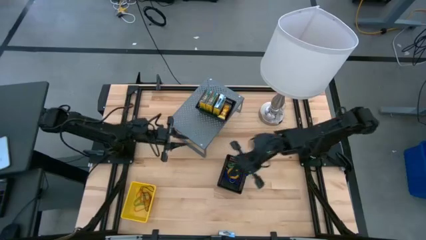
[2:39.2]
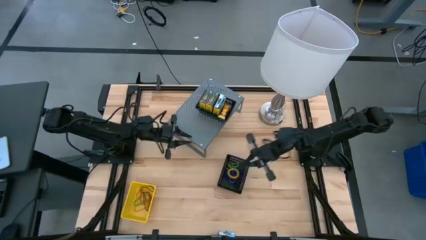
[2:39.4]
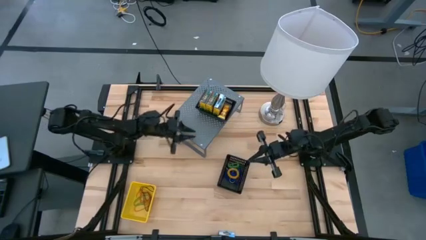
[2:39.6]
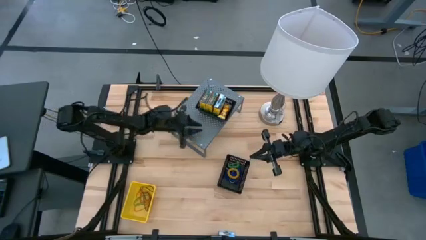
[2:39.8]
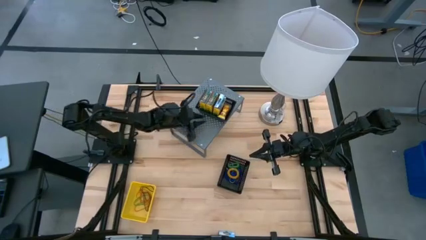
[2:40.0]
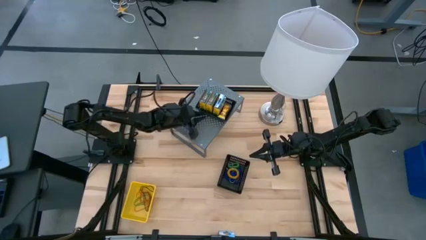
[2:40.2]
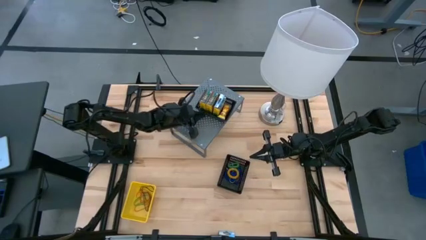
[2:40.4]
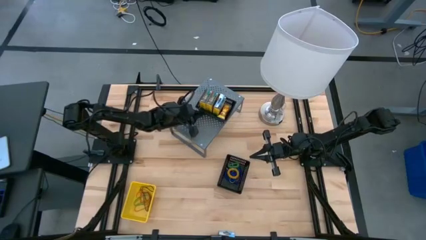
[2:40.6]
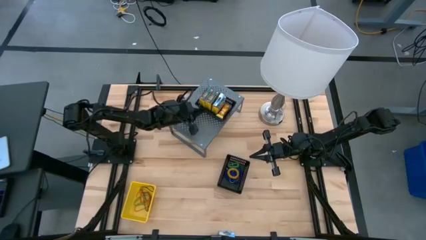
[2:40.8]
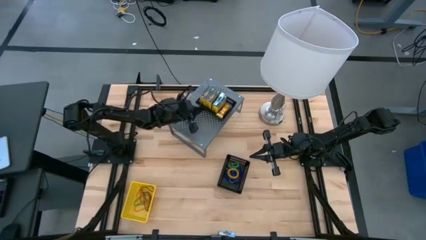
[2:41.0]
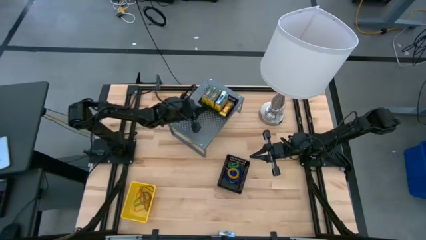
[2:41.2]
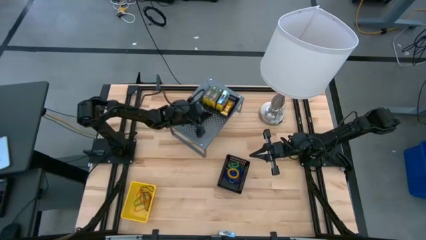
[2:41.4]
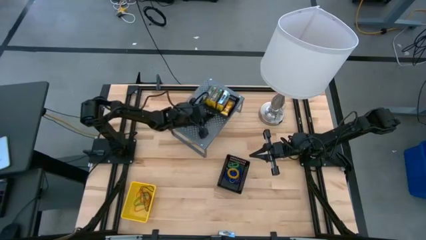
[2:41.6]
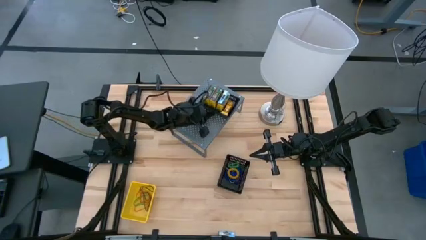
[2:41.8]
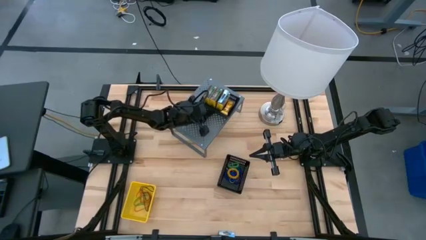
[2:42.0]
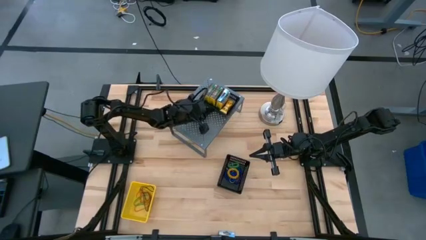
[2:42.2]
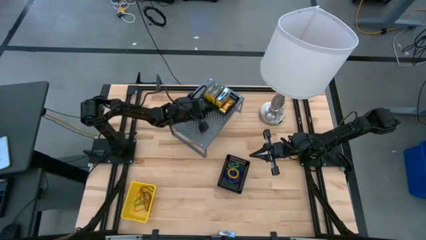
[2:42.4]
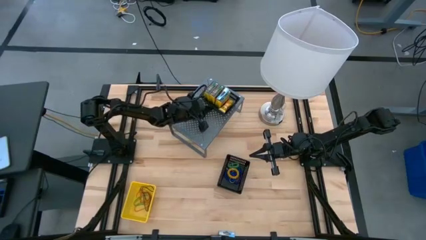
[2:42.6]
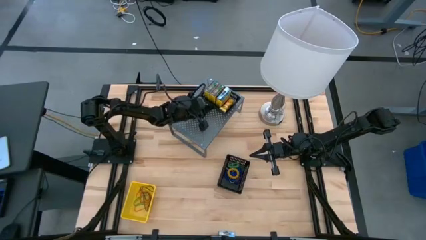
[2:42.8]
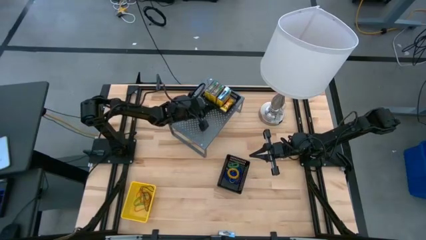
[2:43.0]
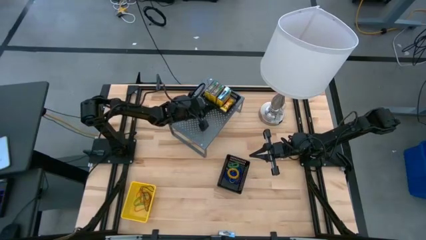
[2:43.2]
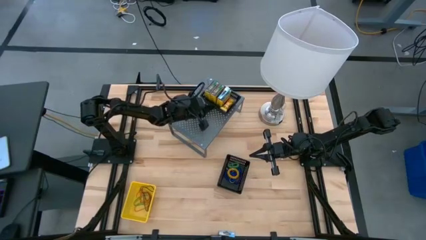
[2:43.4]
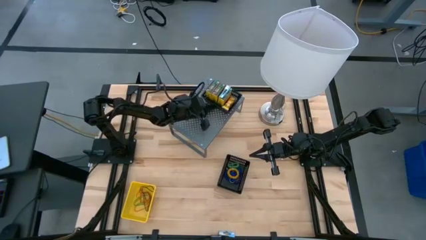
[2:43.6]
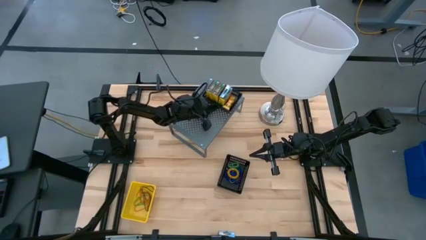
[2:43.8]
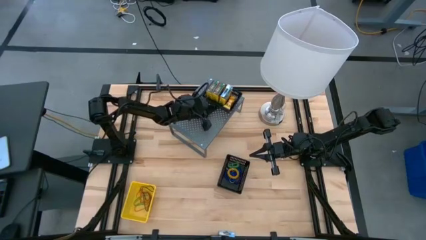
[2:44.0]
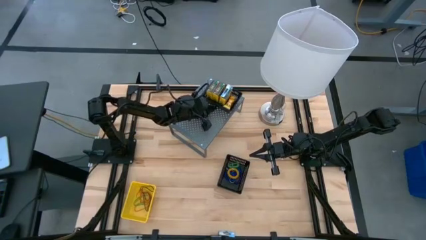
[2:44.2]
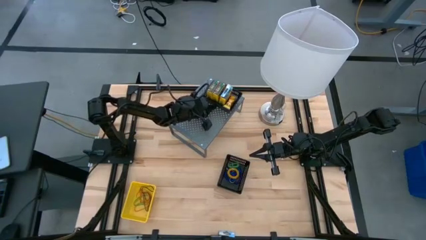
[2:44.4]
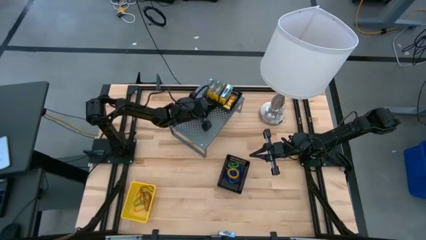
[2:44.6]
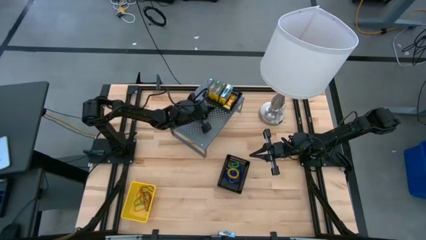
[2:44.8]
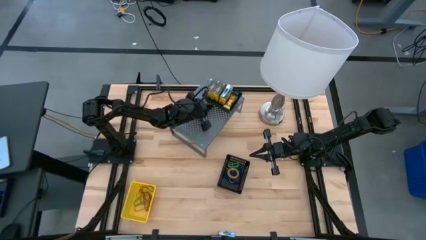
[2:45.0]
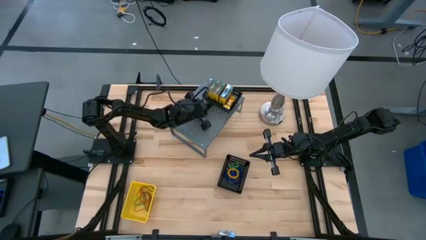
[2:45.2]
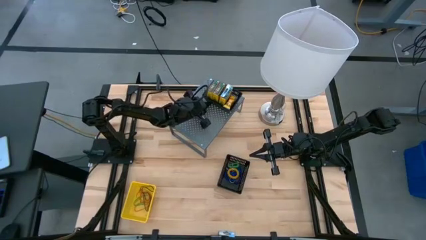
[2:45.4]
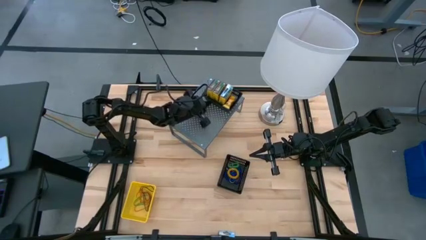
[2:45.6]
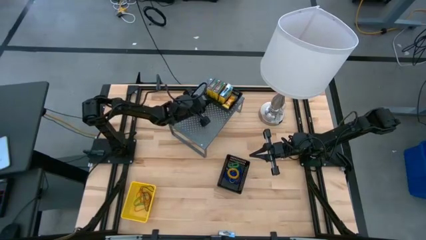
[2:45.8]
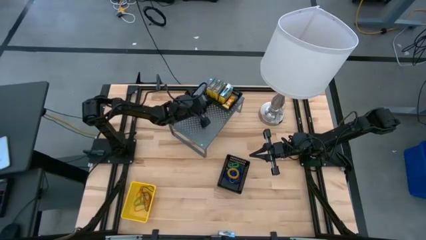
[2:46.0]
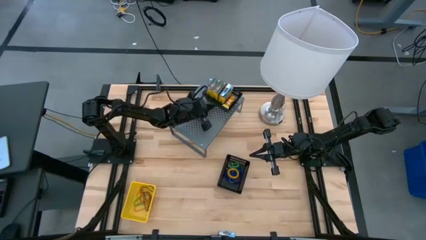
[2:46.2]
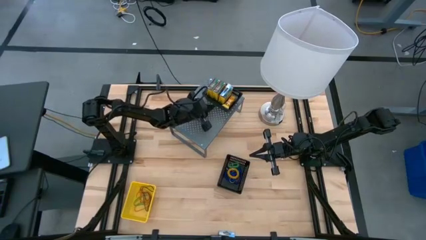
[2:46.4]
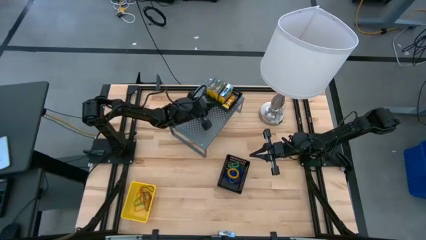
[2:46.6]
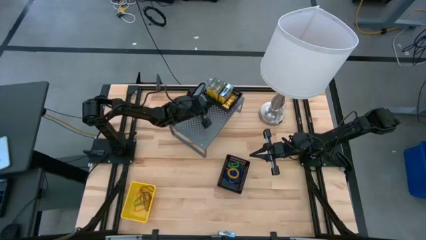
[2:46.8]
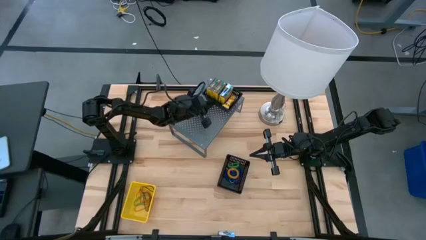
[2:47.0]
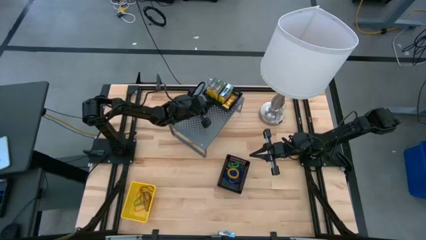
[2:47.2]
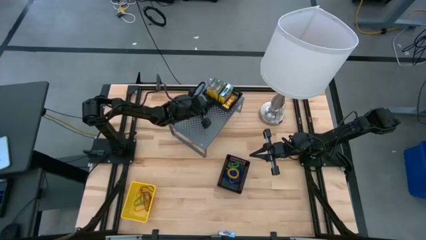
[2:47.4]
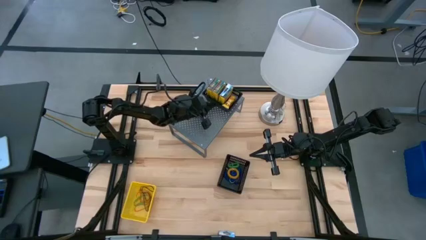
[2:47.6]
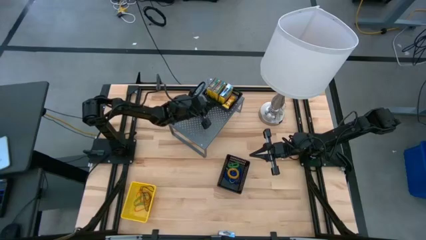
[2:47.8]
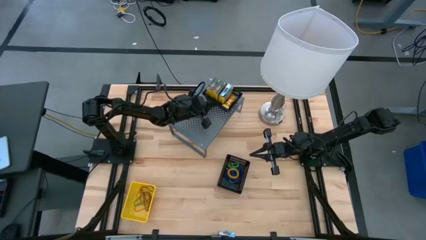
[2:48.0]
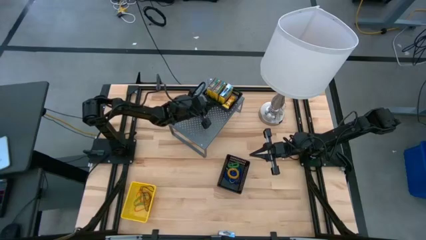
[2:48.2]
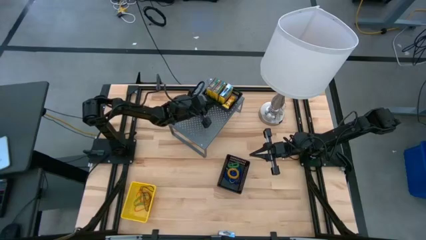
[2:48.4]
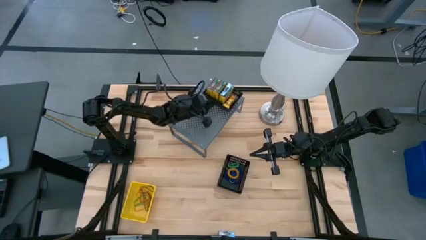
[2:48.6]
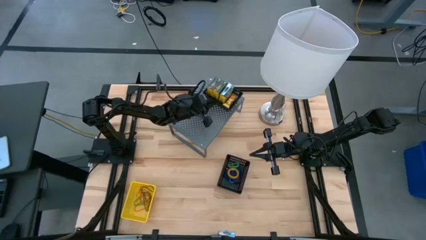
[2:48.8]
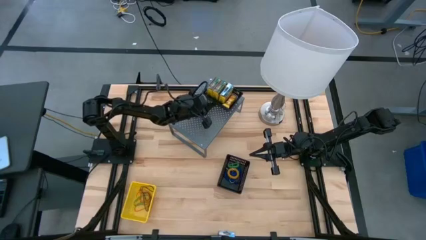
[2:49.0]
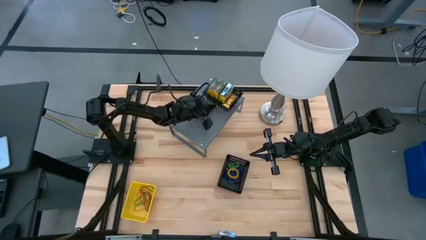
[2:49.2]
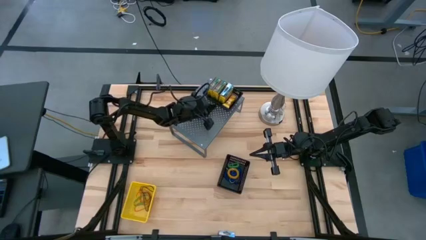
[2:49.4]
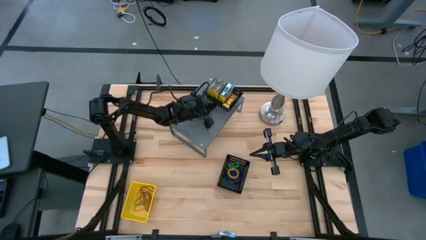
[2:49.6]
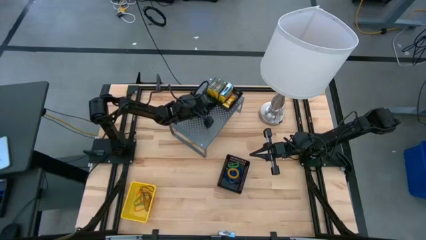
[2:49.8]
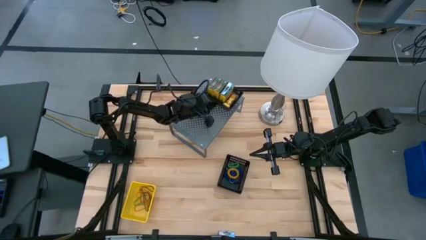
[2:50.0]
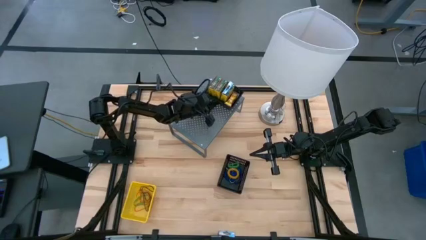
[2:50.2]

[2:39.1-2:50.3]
Task: Pick & Place Office Desk Supplies
Put the right black bin on the shelf

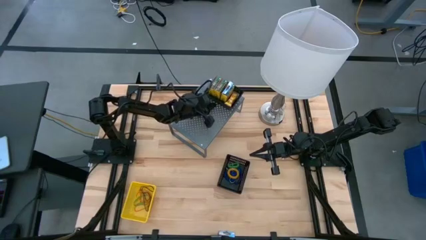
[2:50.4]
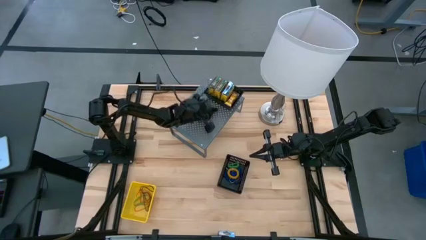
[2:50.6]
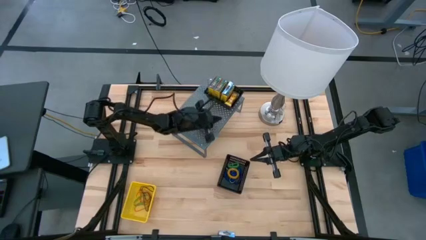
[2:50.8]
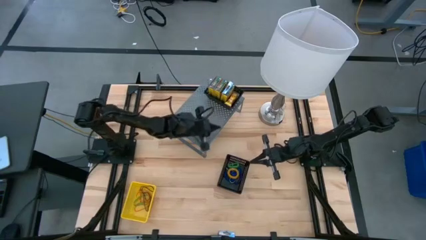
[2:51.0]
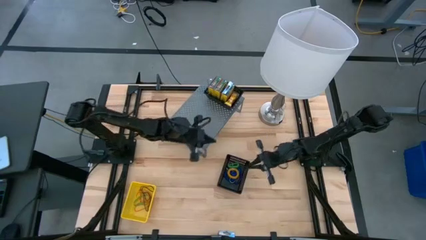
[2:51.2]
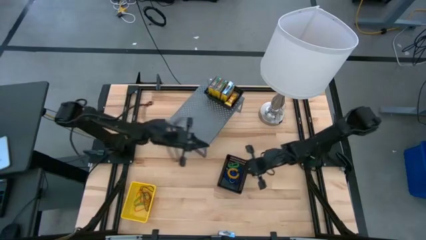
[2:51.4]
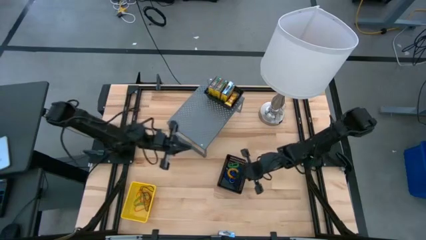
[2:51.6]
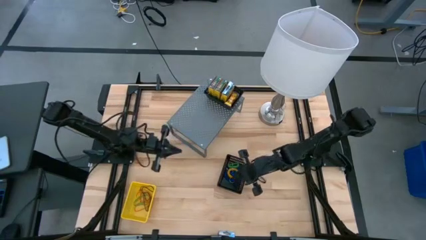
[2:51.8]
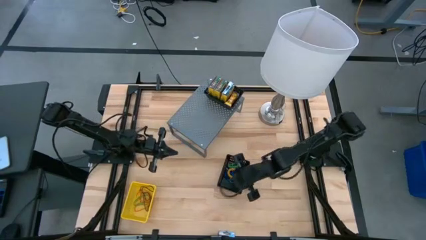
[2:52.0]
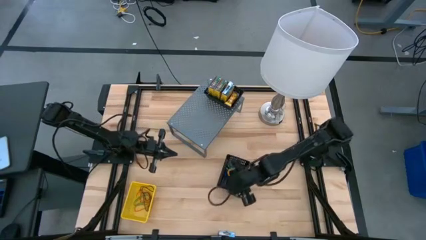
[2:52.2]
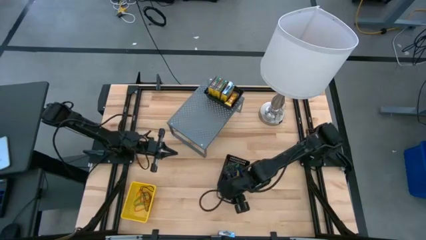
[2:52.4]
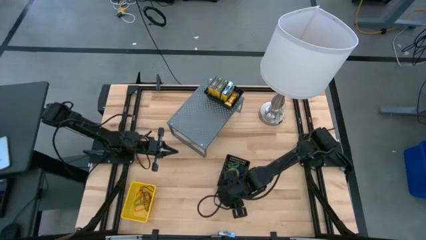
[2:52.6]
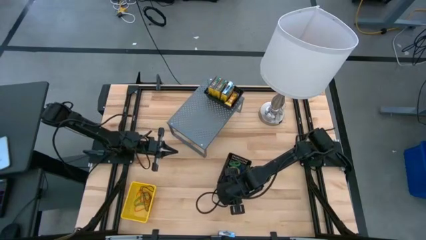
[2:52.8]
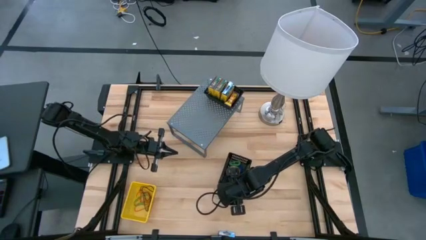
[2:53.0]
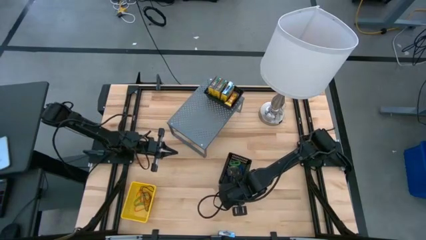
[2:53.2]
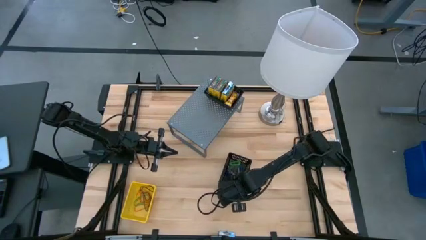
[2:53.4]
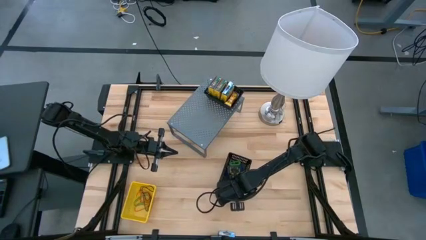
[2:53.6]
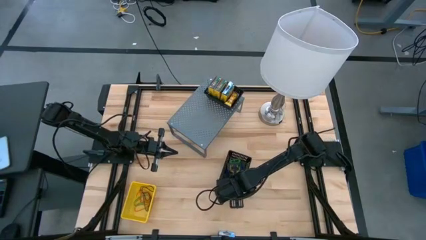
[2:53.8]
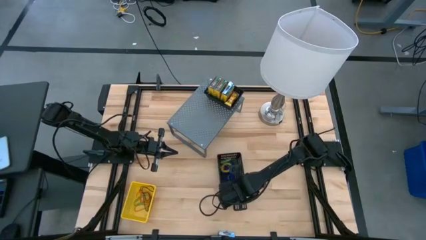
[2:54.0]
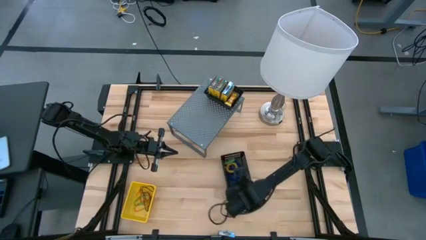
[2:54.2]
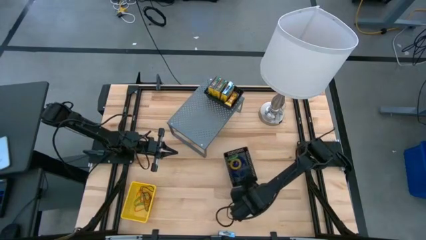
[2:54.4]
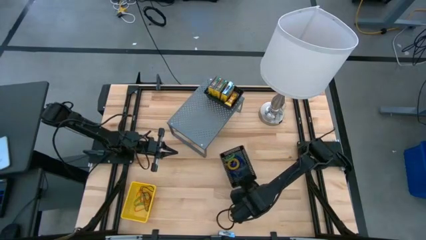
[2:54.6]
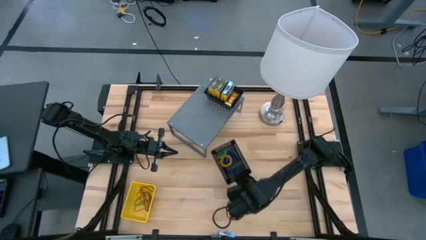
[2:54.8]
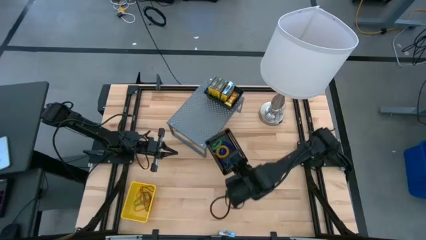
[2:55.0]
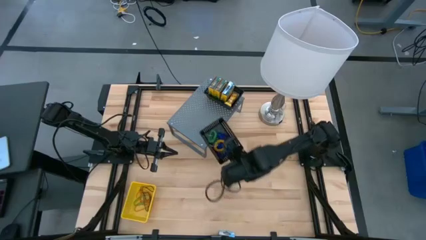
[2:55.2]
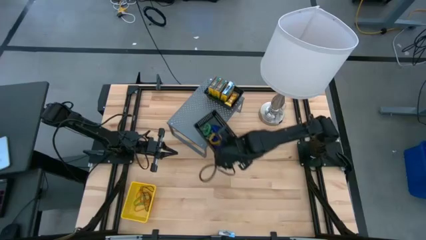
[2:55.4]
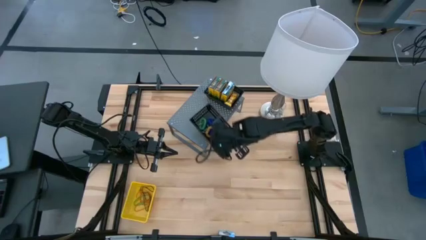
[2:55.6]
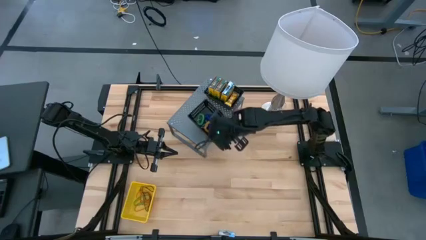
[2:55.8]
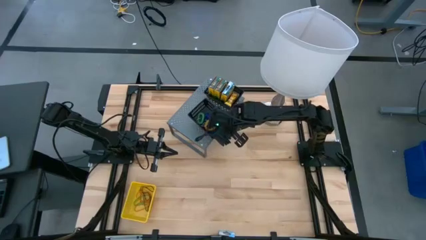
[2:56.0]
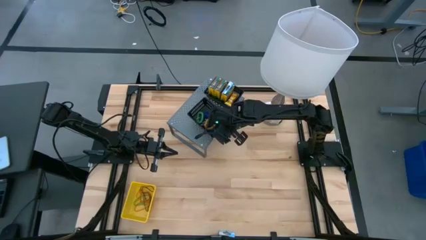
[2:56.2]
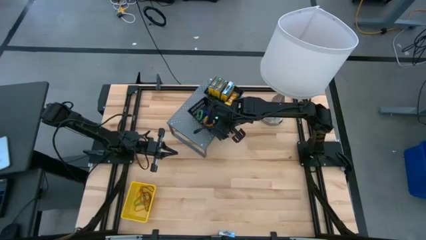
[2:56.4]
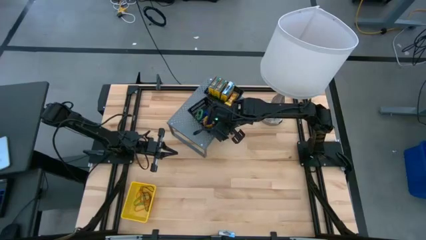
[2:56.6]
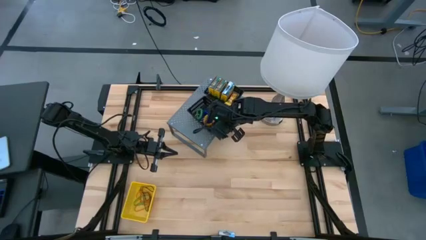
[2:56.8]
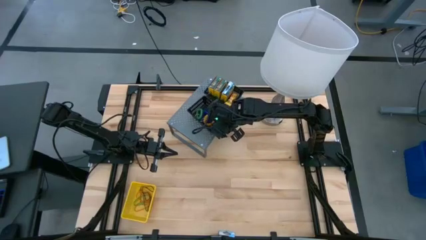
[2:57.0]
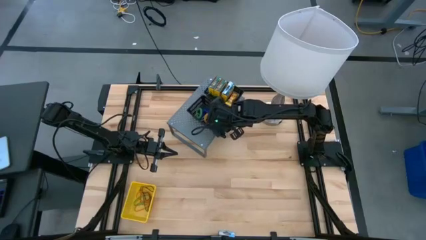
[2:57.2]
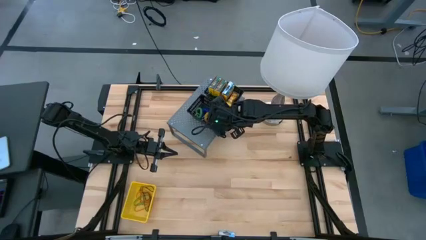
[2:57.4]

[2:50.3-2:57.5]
Put the black bin on the shelf
